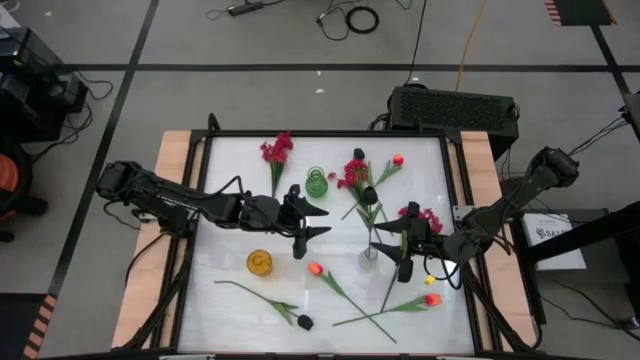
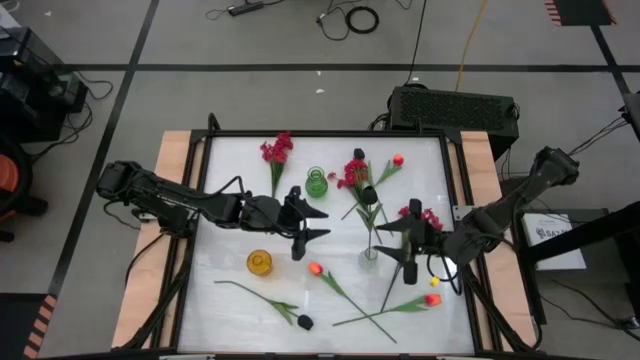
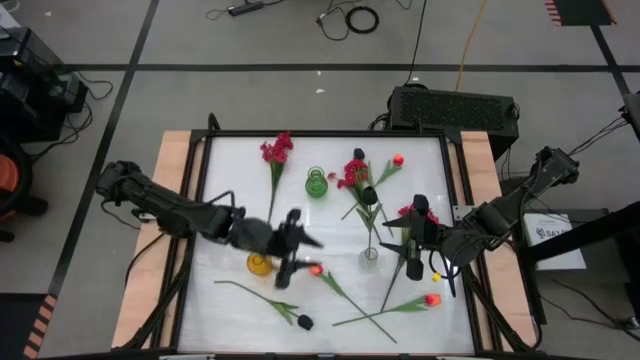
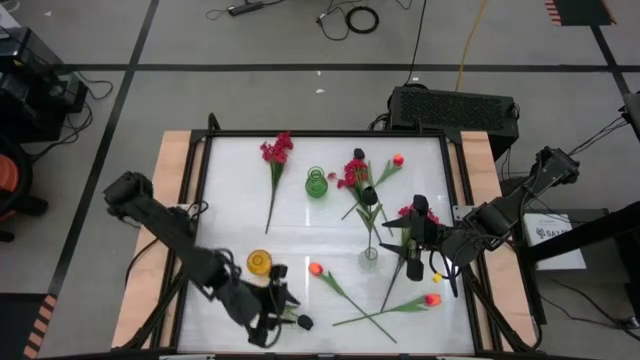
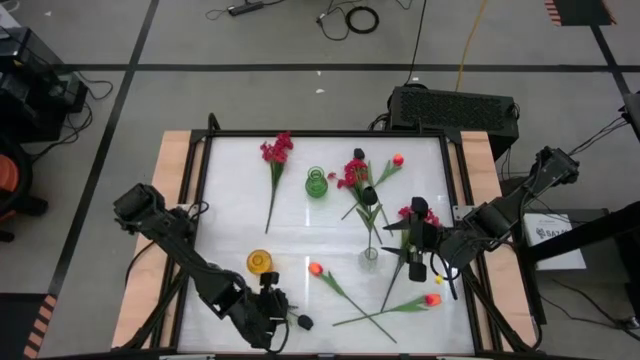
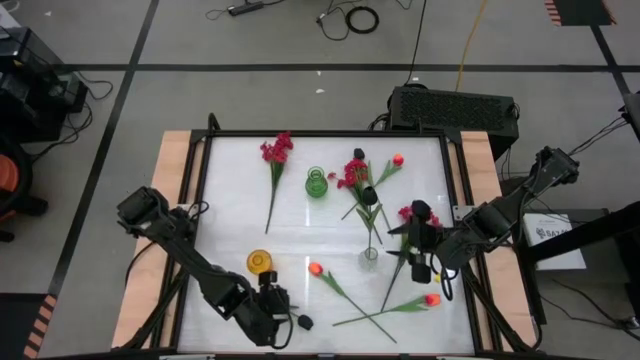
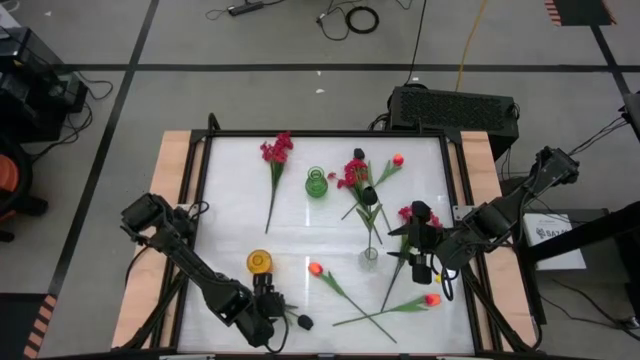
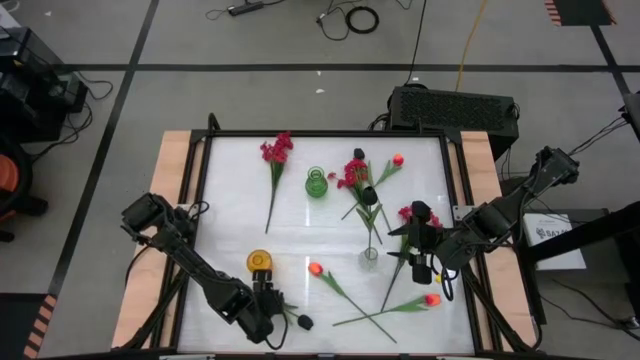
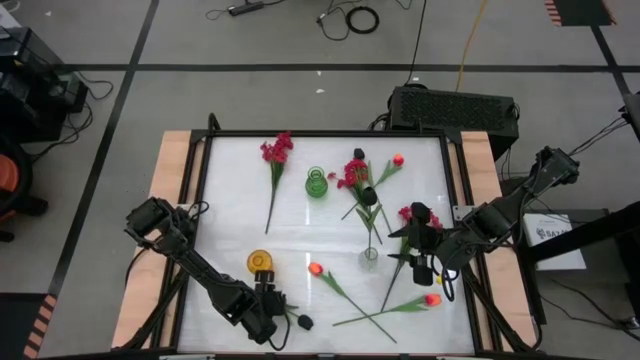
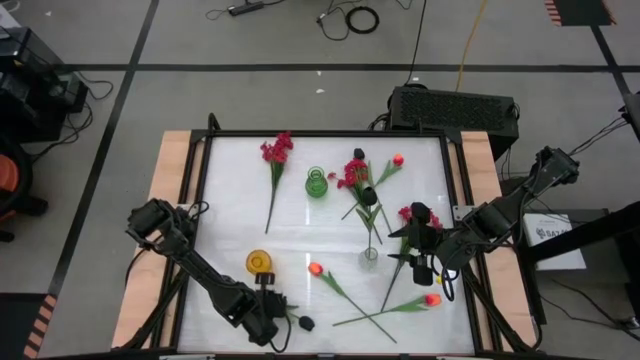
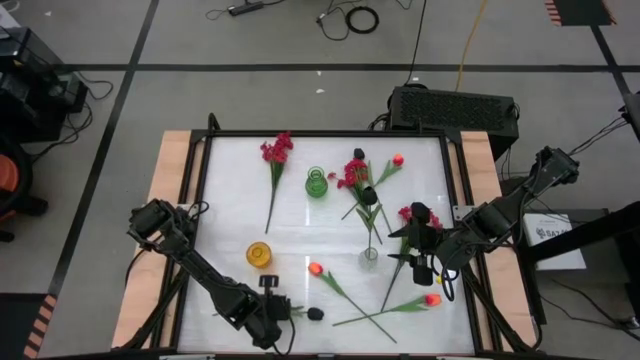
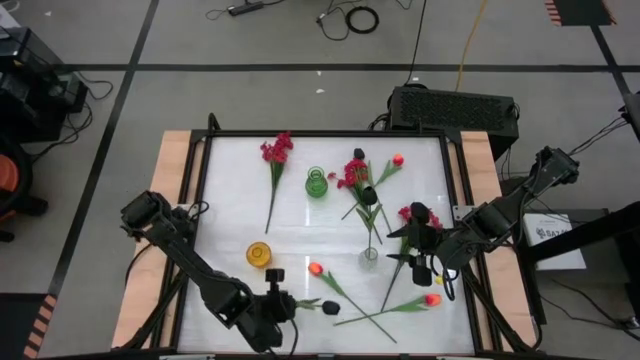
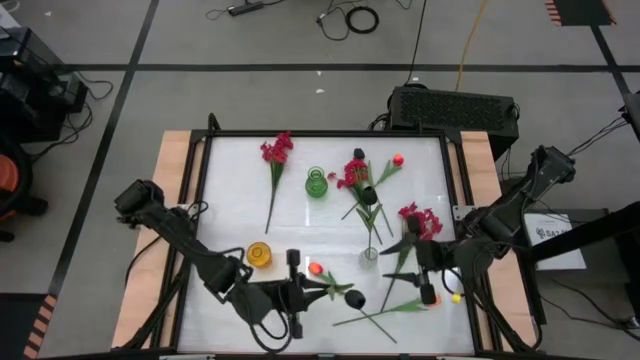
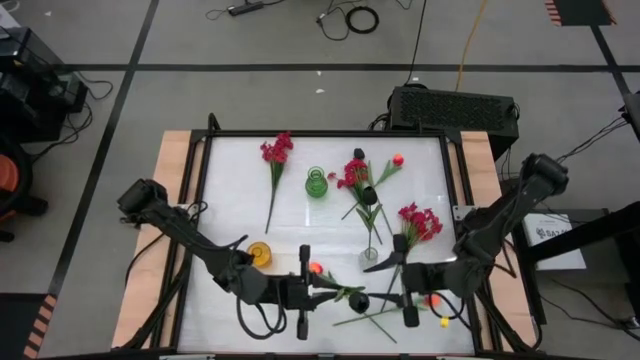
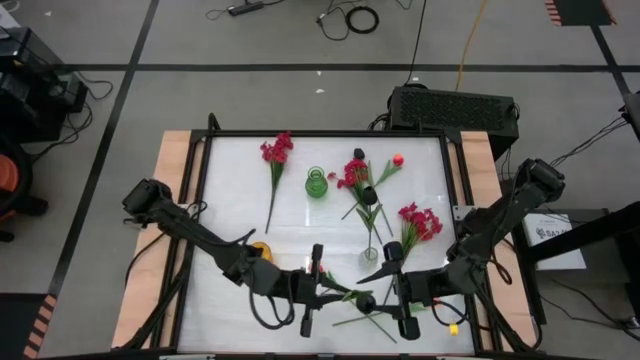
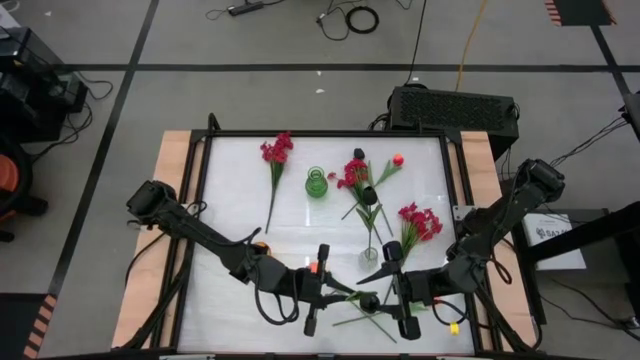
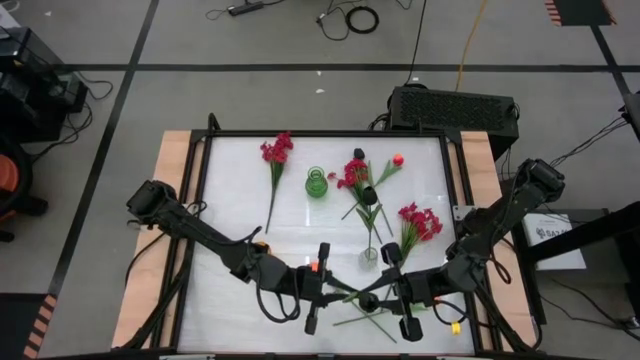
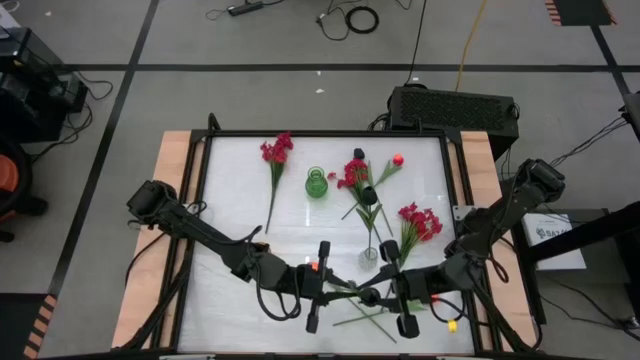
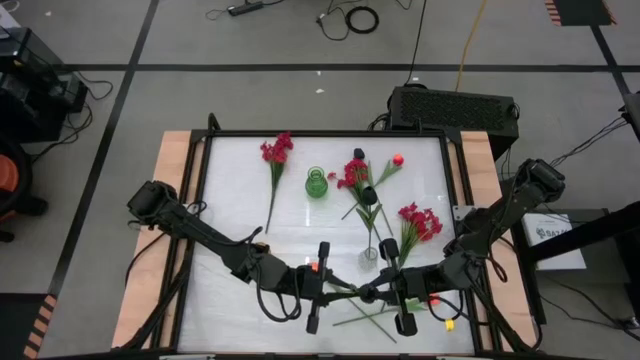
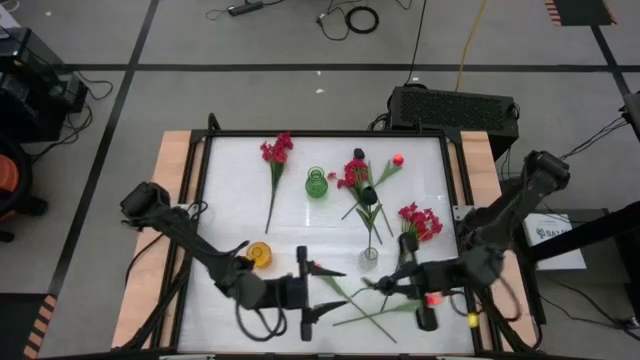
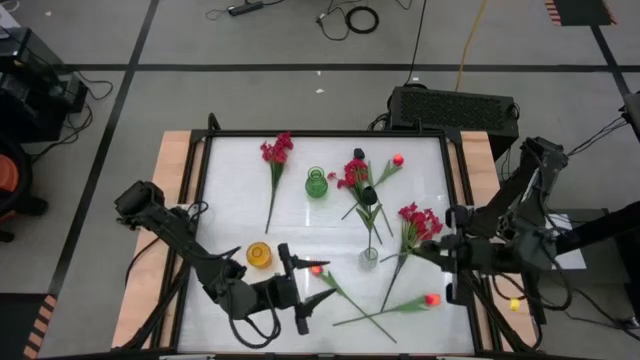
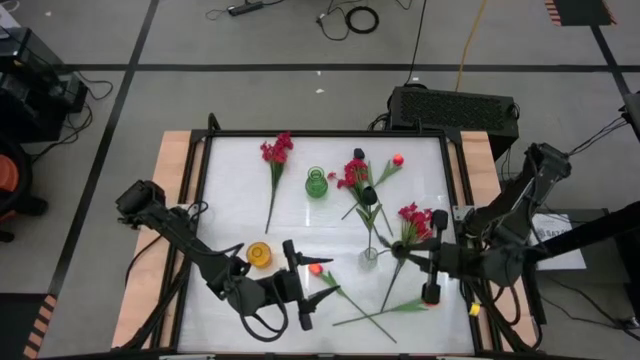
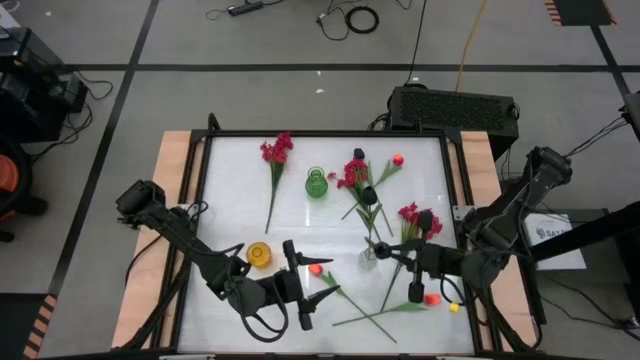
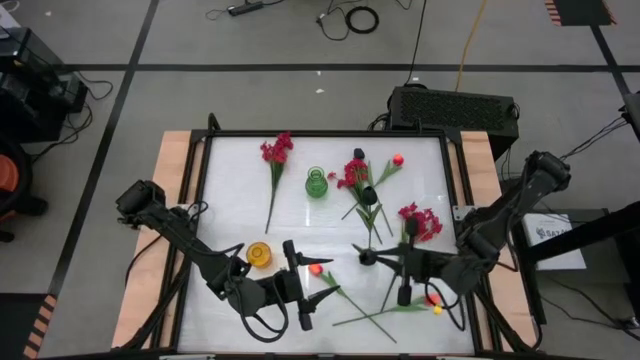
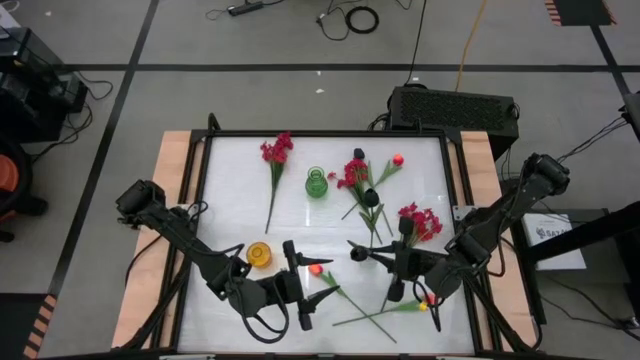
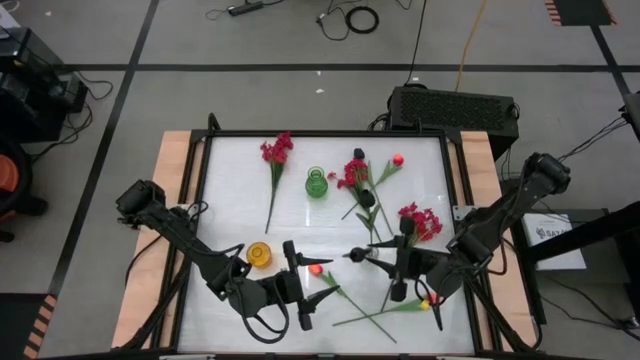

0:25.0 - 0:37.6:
Task: Sort flowers into vase by color
Put bottom black flower into the transparent vase

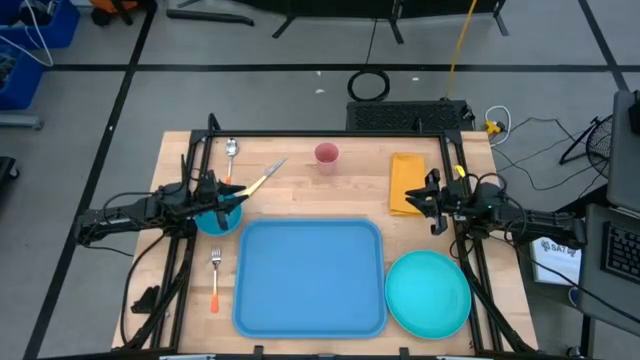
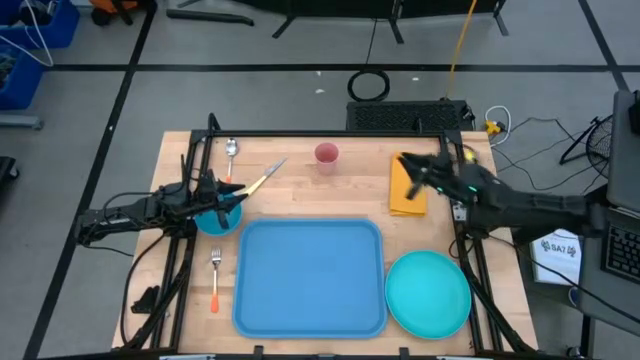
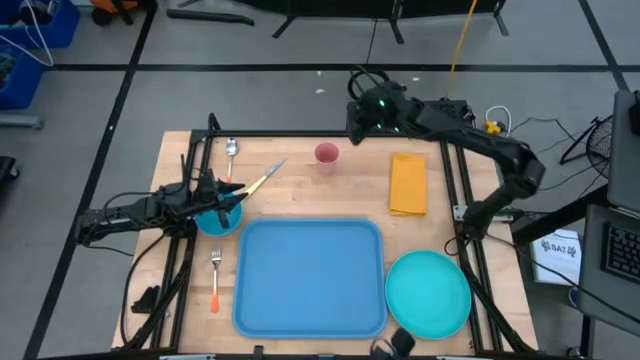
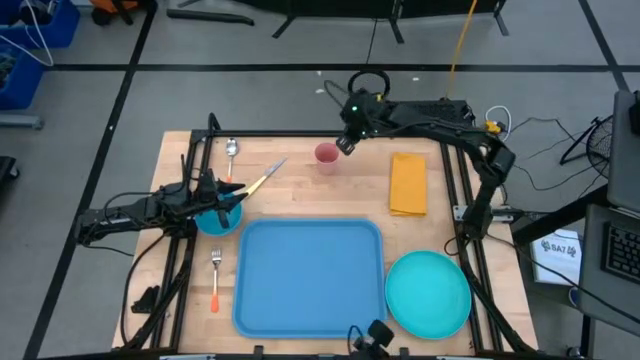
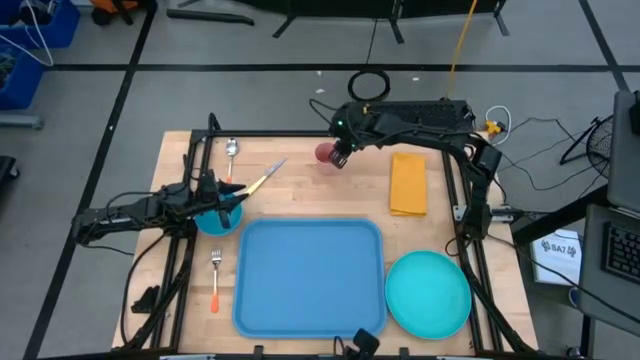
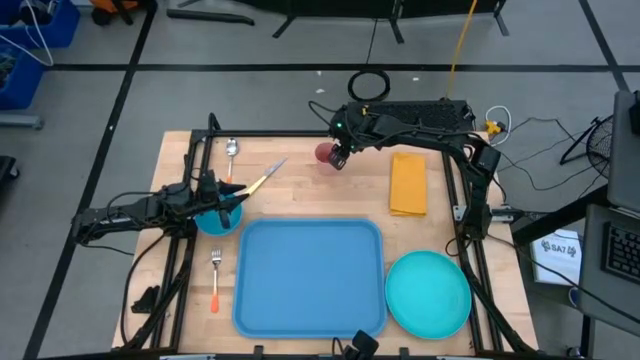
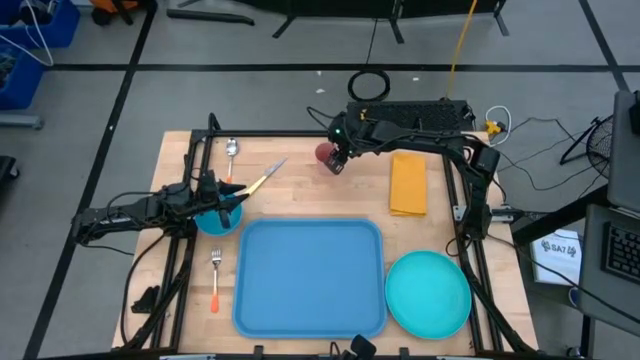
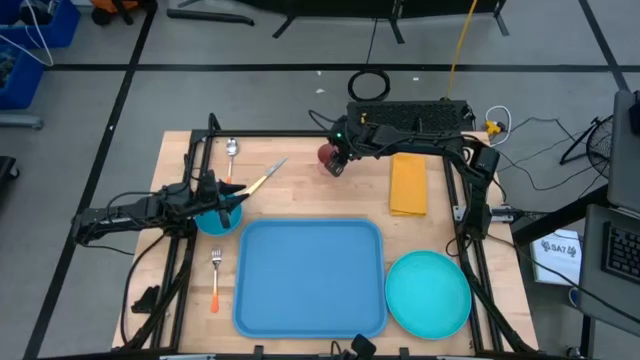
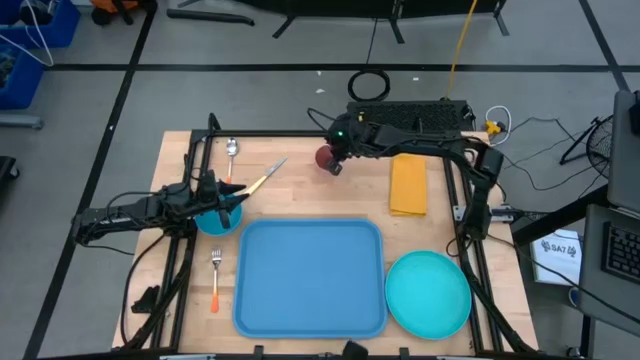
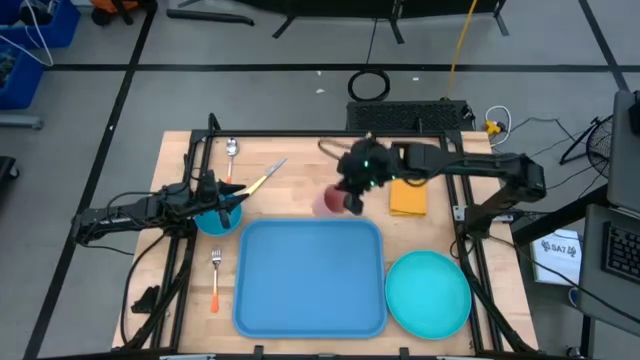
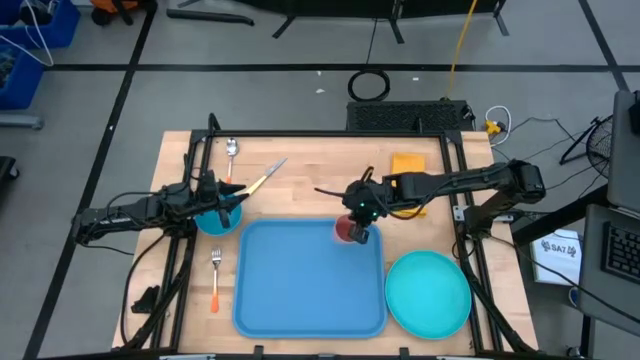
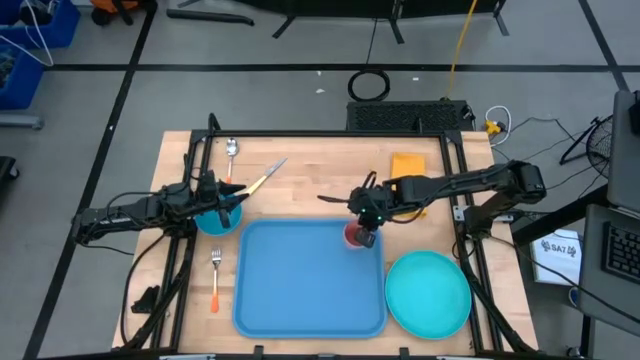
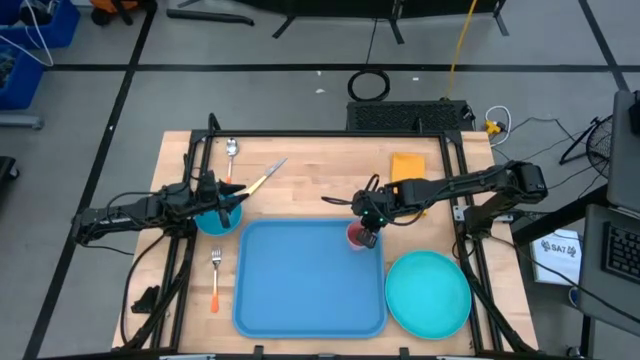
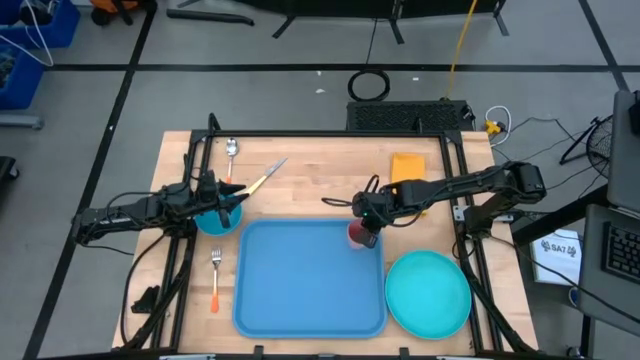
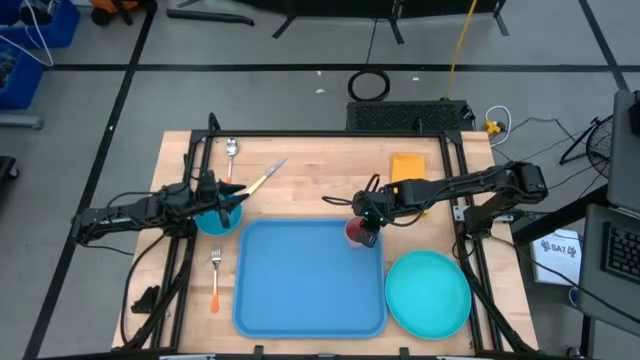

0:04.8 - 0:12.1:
Task: Set up tray
Put the pink cup on the top right of the blue serving tray
